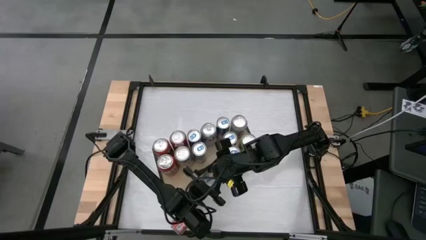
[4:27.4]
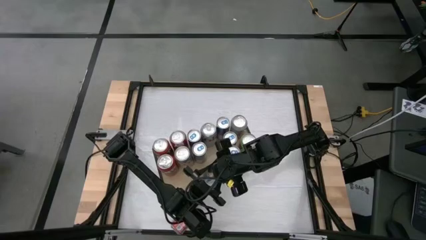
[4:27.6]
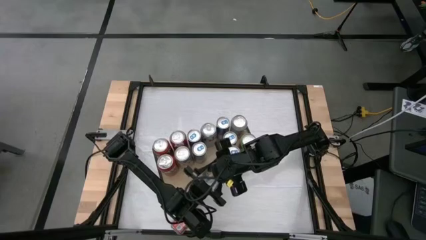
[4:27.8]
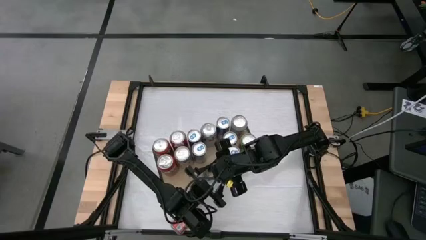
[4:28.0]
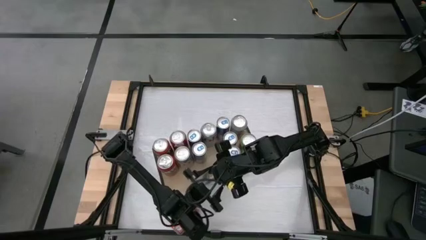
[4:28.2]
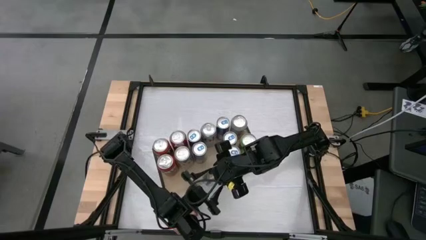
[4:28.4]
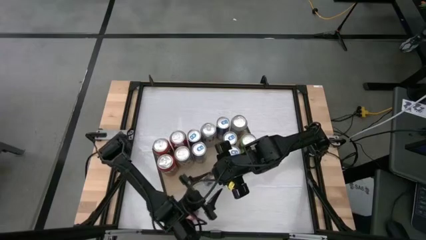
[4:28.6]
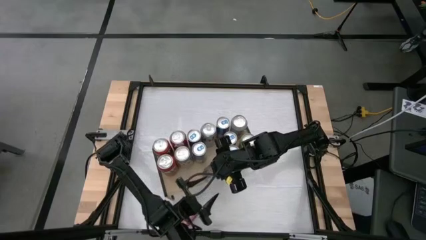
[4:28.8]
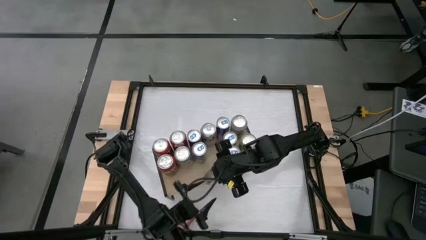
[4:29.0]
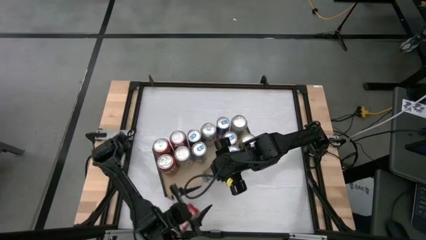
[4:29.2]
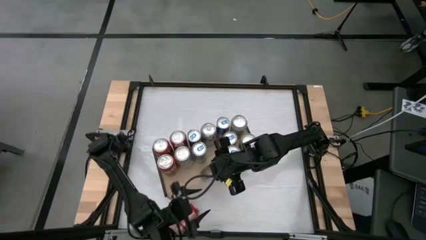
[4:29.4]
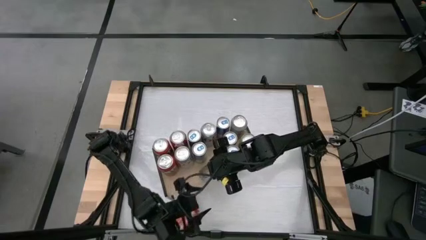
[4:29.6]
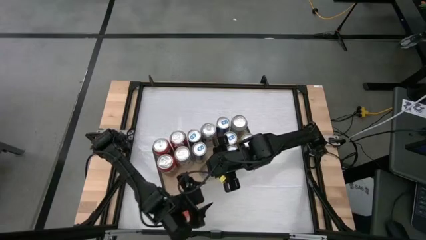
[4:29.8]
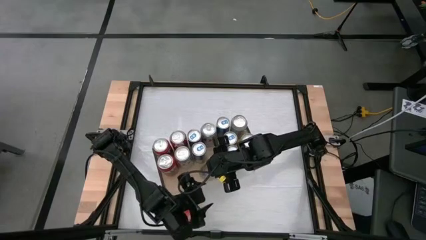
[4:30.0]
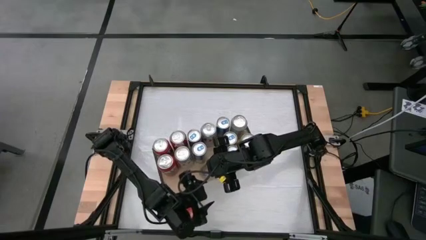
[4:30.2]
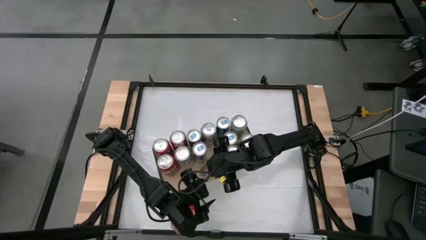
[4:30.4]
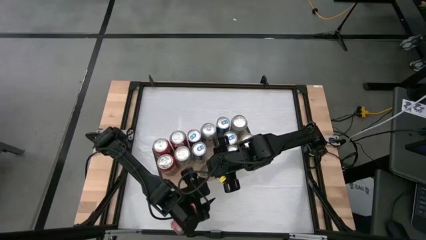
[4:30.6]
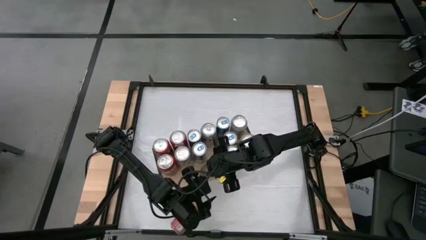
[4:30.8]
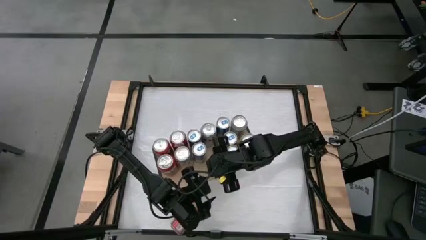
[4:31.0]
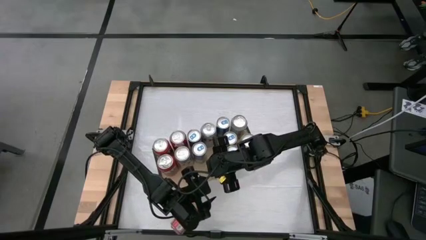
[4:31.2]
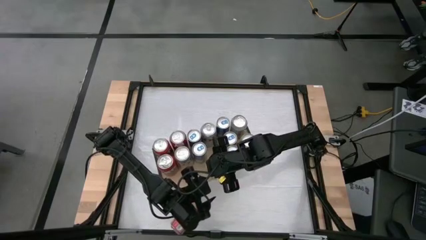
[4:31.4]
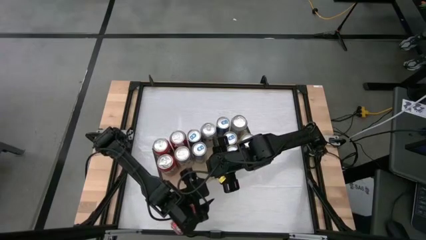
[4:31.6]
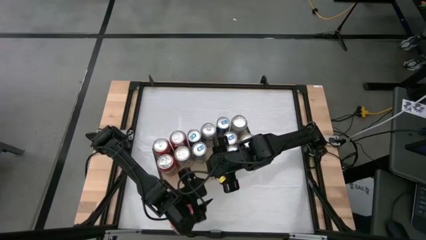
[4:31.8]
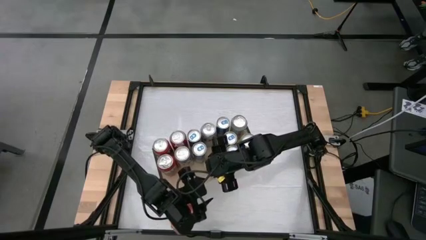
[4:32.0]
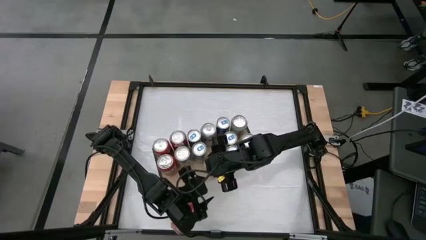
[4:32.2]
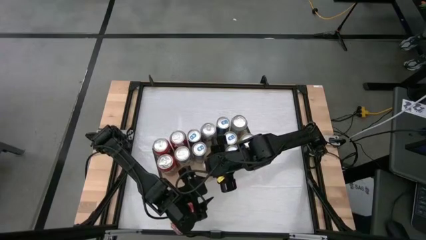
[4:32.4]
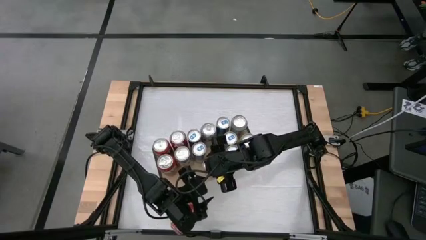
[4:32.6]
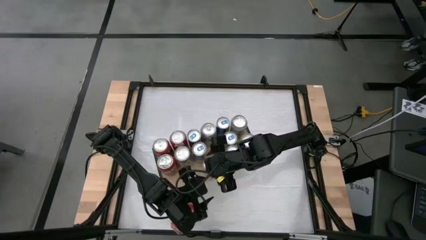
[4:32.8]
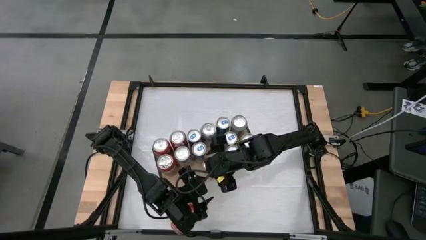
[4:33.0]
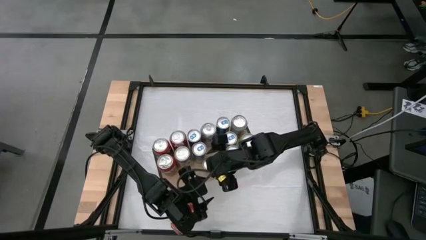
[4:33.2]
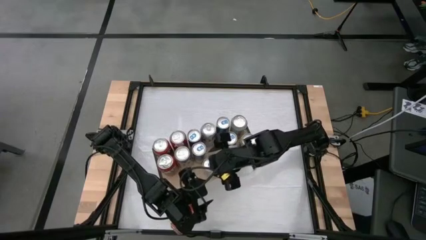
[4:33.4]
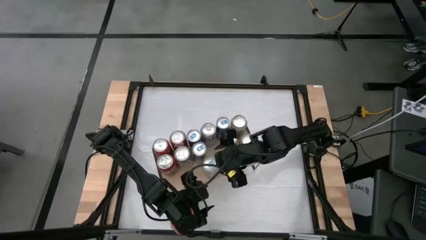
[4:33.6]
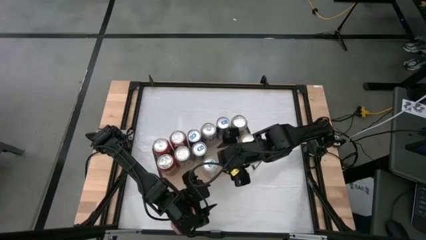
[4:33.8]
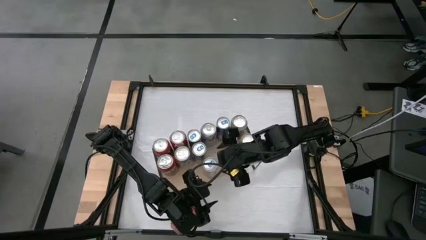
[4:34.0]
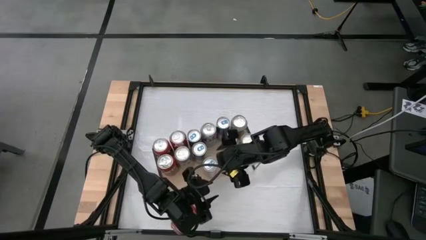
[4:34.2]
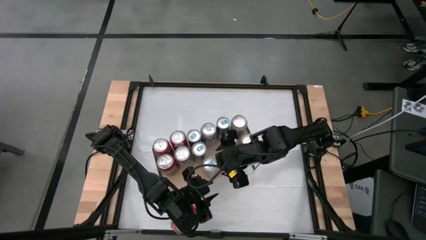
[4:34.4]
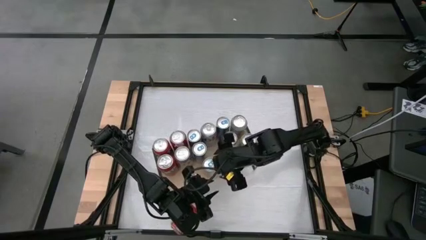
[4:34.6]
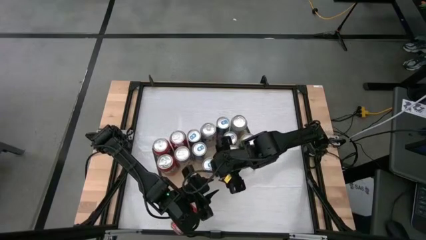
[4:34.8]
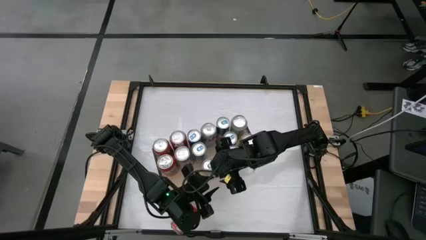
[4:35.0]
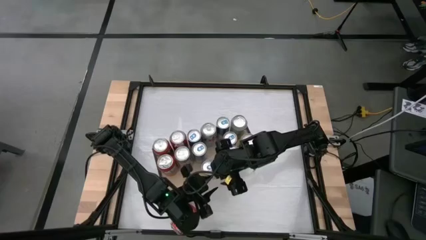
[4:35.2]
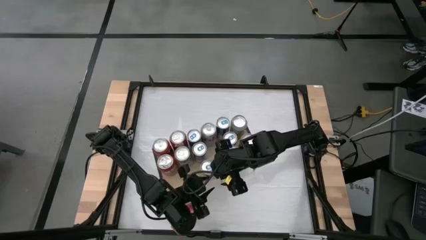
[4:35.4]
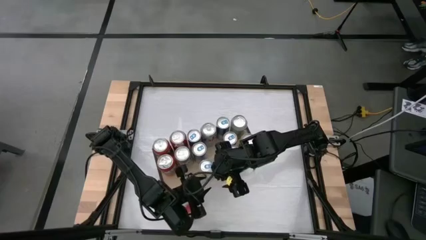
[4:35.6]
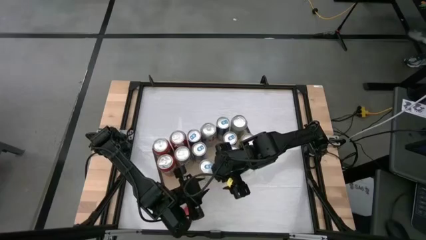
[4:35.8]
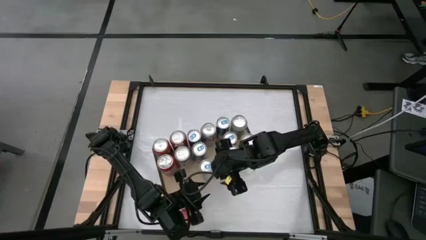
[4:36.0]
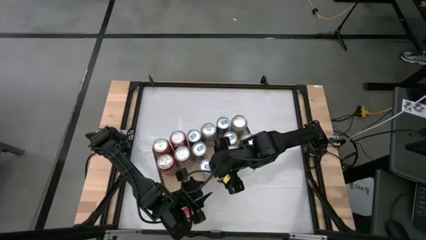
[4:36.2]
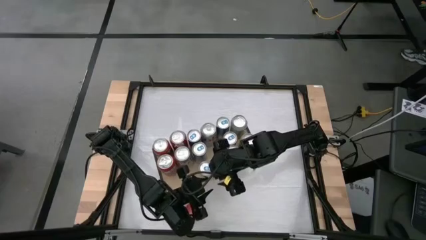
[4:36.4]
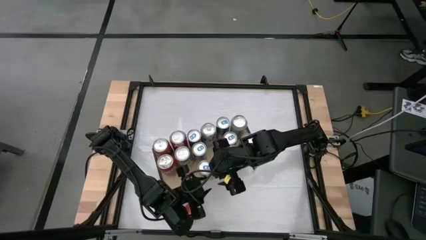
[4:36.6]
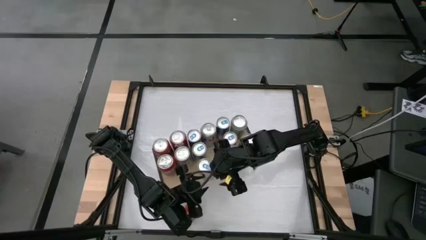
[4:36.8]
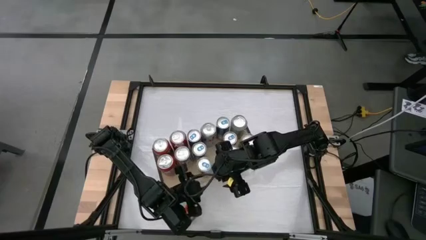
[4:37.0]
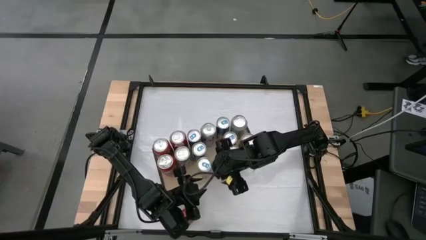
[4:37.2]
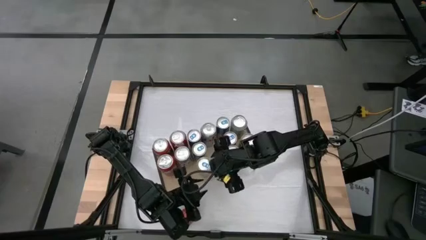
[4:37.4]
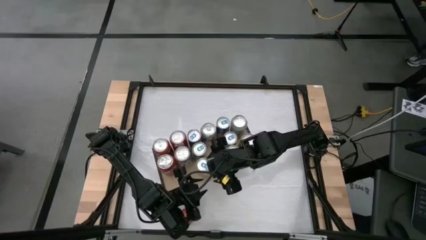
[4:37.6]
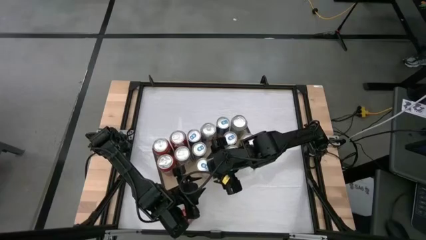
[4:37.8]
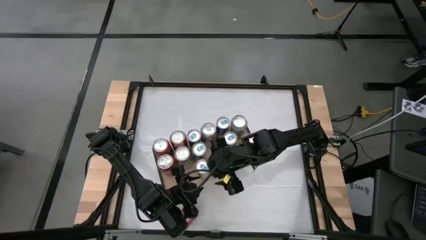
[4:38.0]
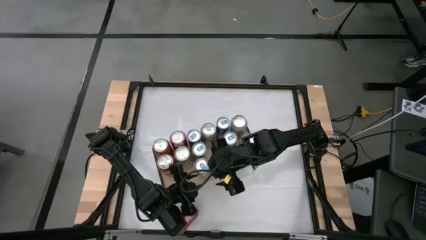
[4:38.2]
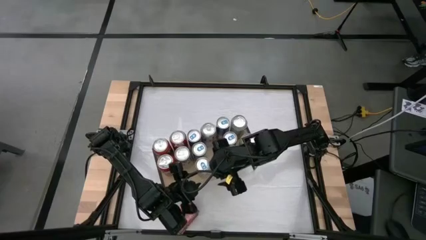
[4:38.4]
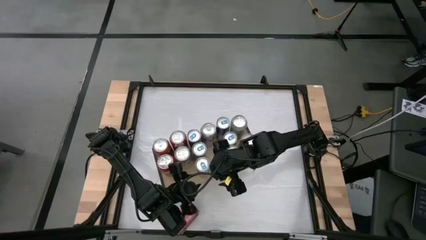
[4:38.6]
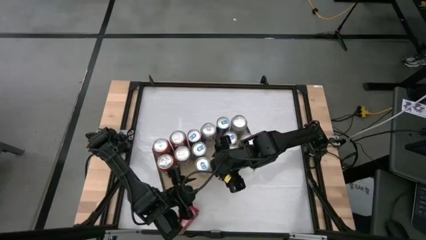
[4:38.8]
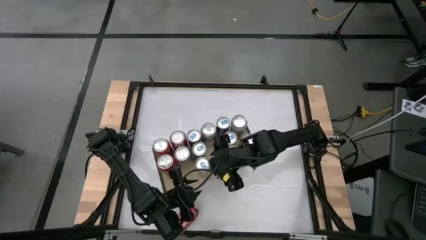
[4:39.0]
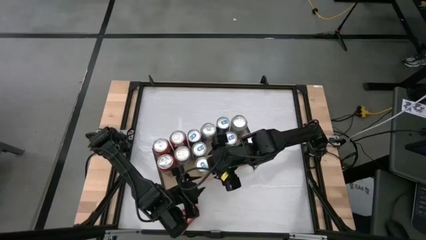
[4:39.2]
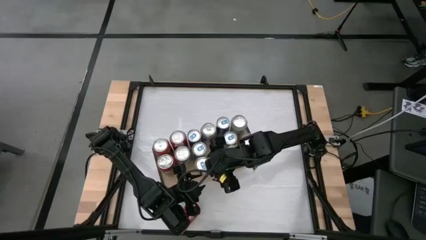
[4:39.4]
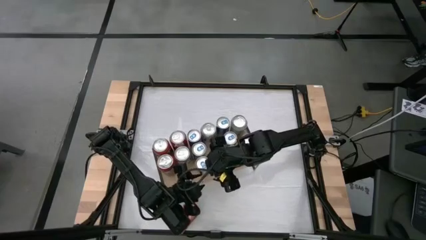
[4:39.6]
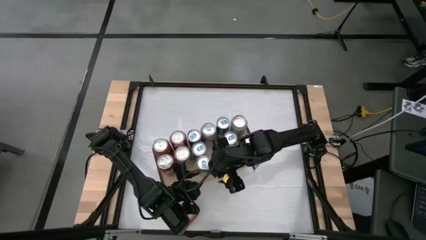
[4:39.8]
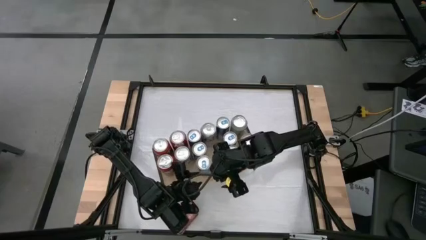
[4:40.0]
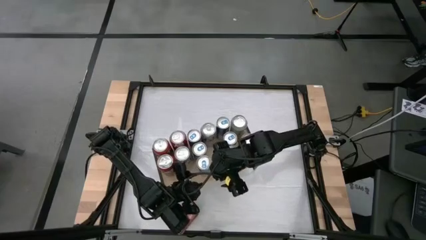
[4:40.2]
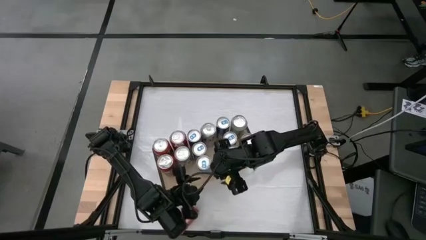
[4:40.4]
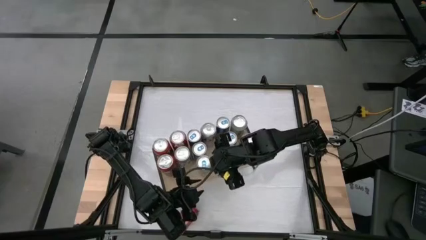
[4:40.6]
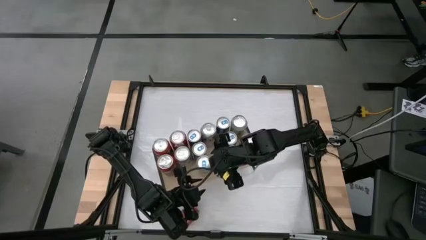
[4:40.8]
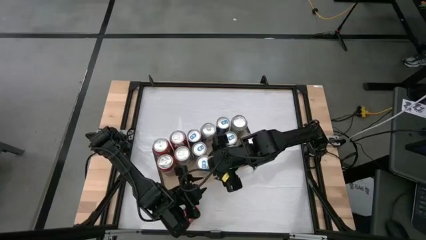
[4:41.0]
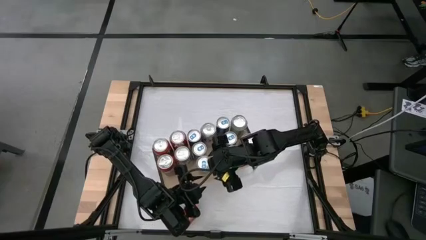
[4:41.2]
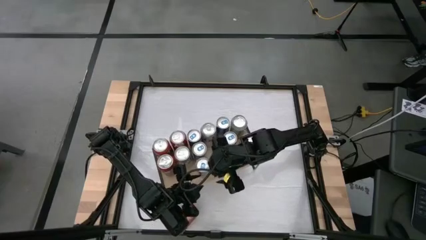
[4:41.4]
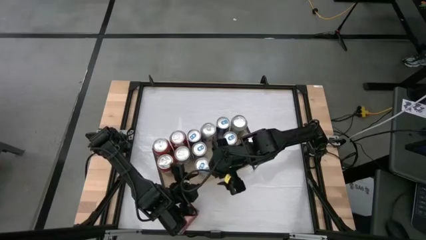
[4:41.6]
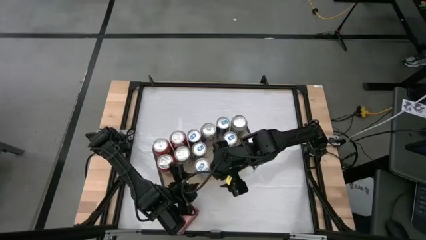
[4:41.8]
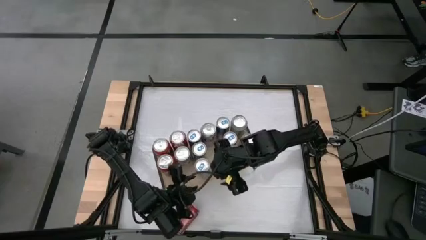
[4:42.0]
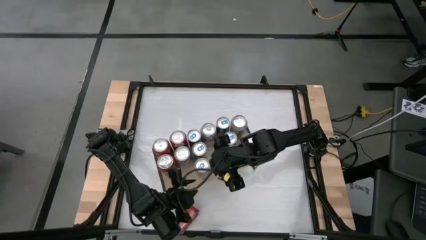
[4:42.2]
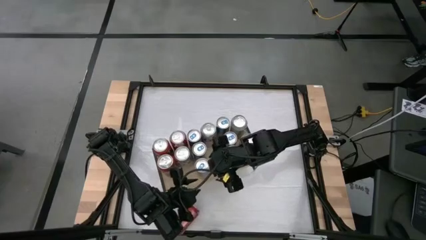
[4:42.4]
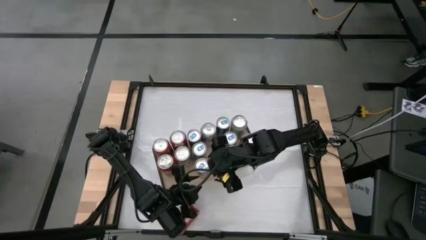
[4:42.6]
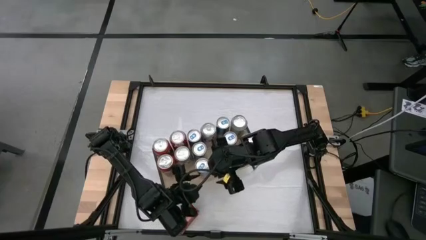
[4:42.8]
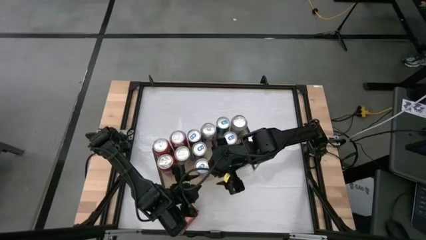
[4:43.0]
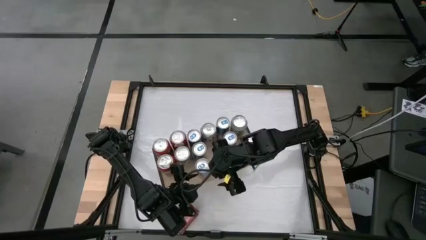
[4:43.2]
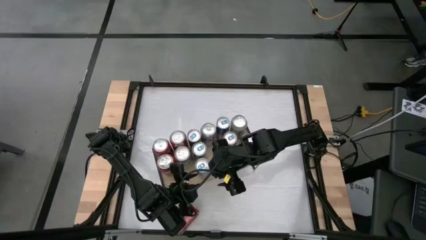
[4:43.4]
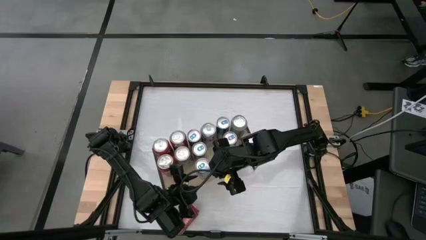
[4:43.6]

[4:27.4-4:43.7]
Task: Place canned beverage on shelf
Put the blue soda can on the shelf aligned with the other blue soda can
